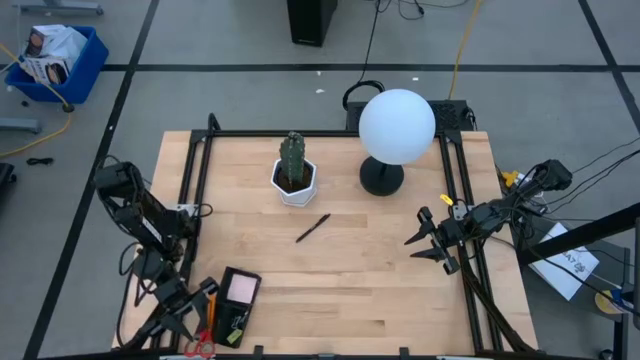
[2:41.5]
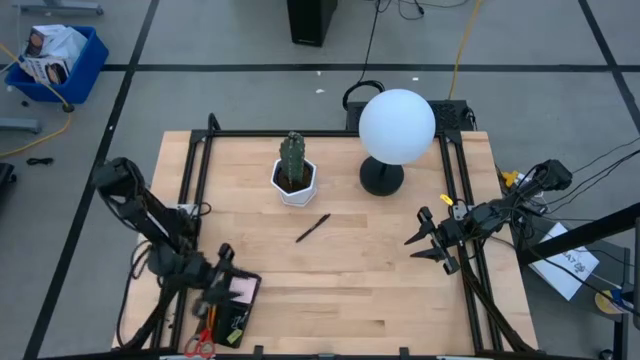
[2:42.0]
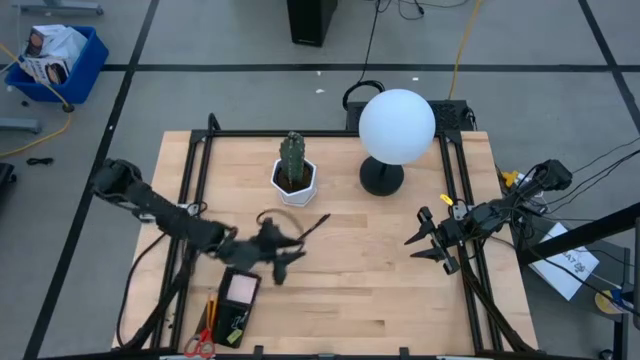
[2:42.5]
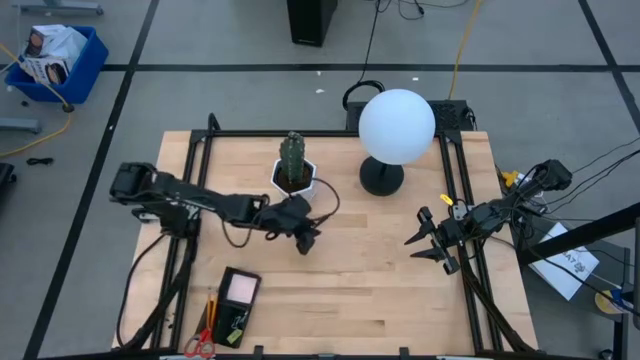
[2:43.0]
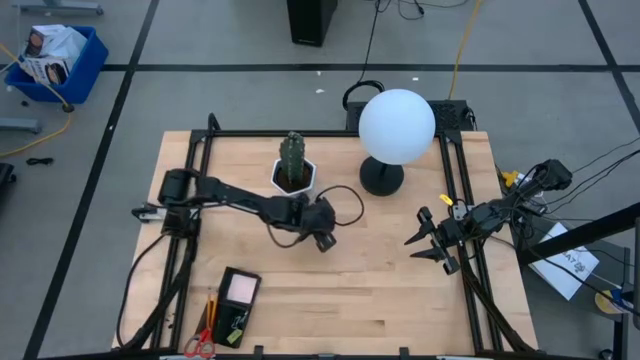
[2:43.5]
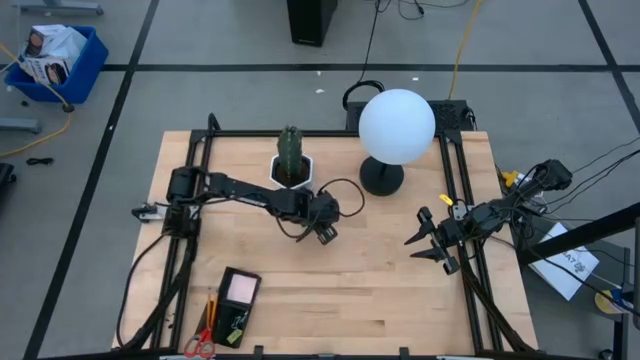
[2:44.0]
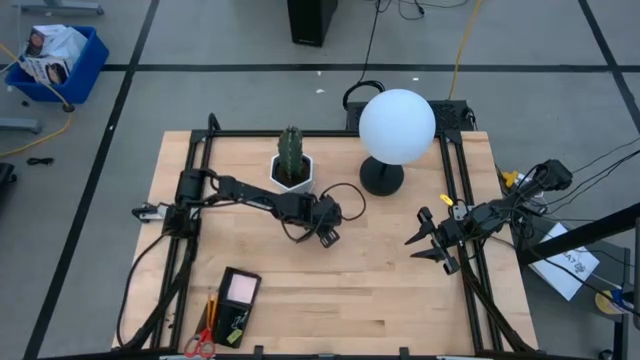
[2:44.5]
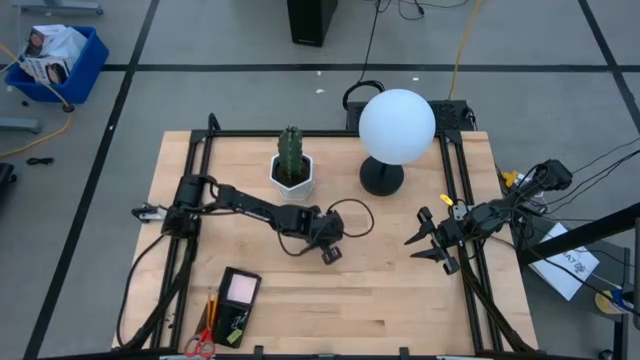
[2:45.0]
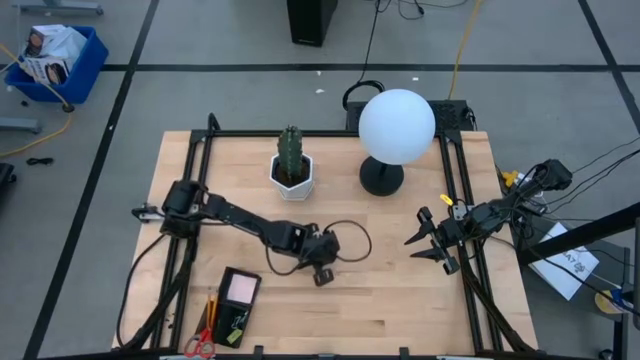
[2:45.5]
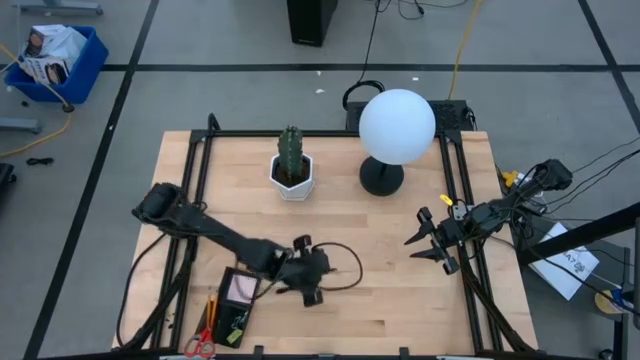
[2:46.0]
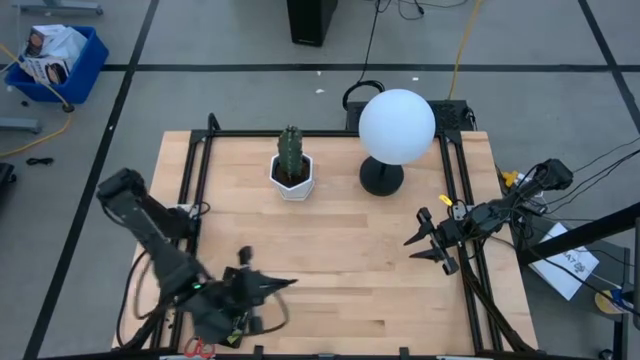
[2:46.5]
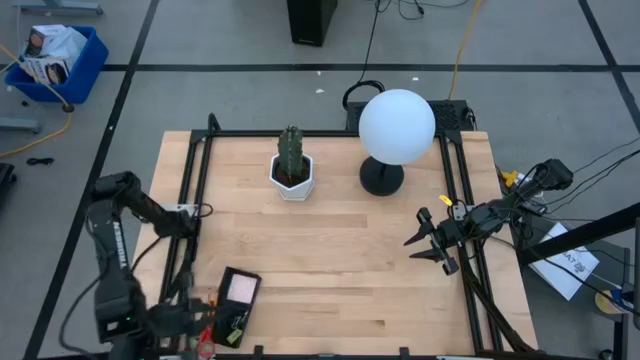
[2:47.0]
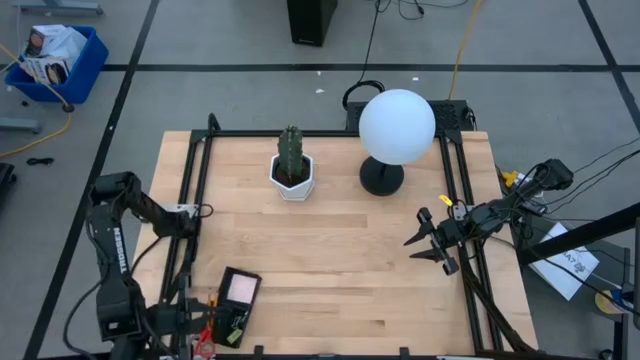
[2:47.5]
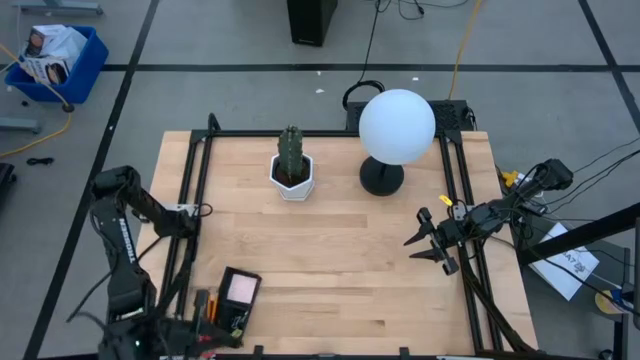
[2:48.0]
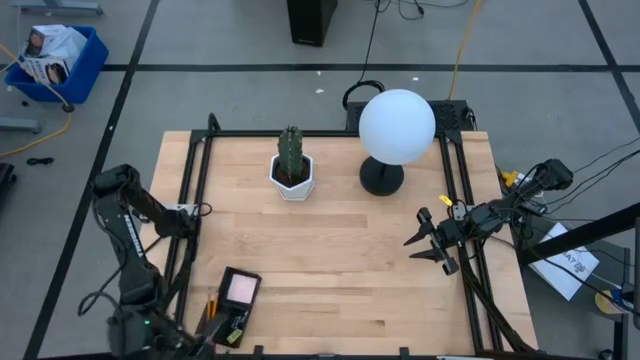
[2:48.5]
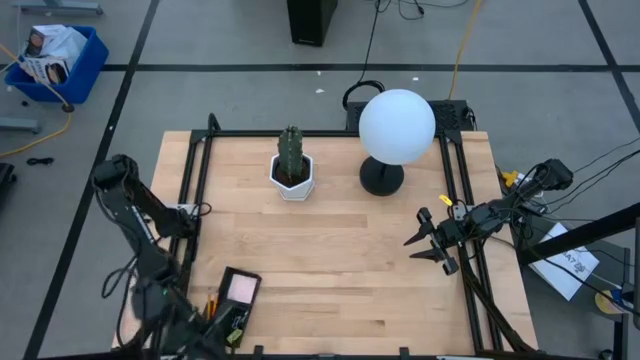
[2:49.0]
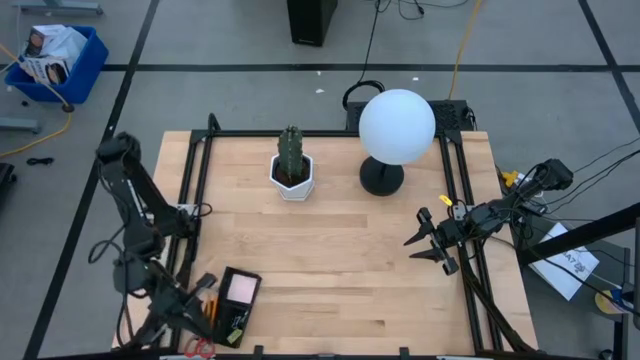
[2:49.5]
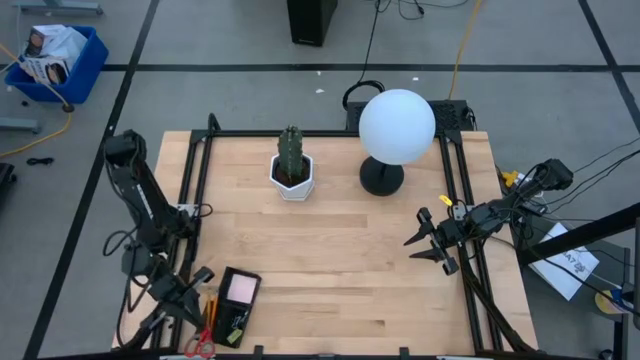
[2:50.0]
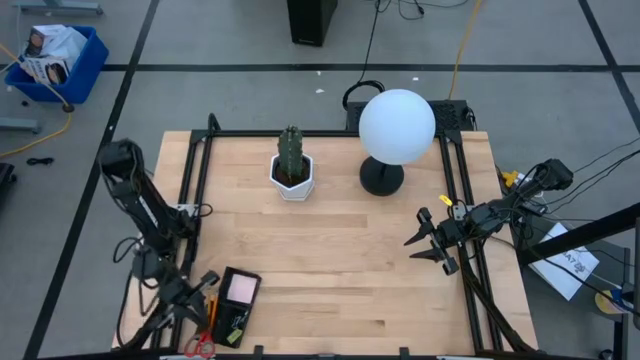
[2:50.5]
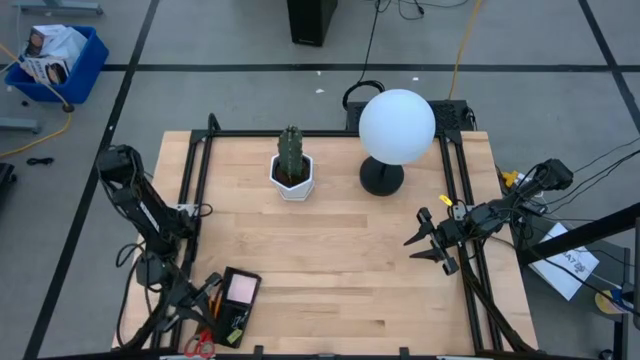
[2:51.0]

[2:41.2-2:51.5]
Task: Pick and place office supplies into organizer
Put the pen in the desk organizer

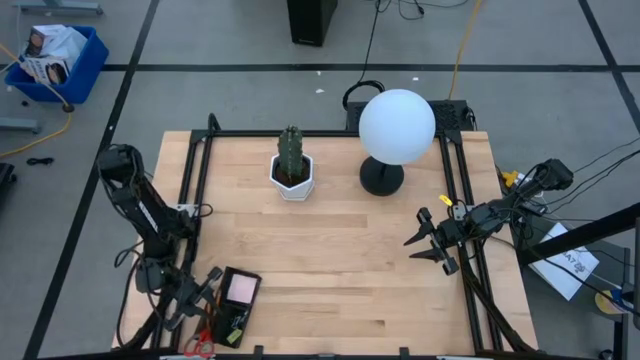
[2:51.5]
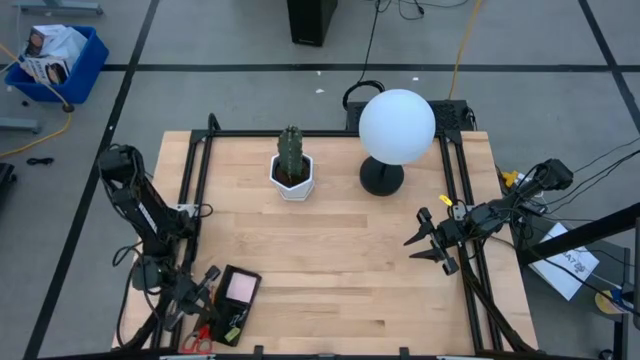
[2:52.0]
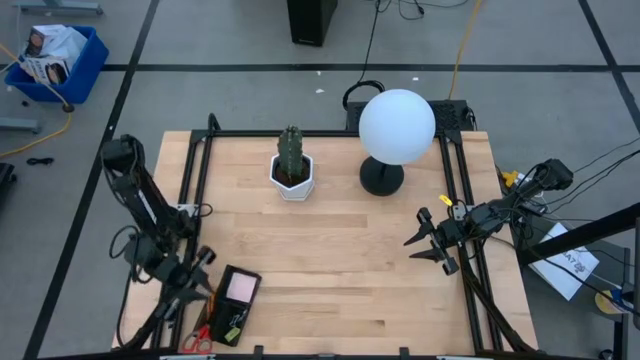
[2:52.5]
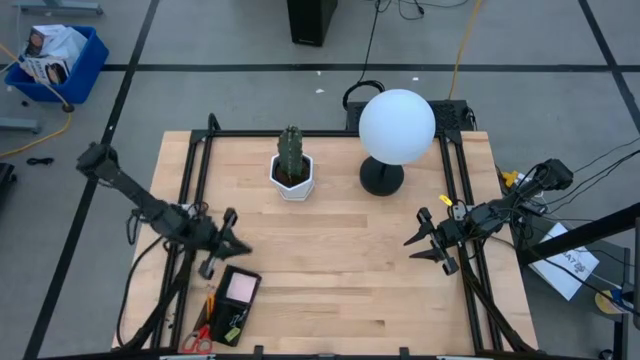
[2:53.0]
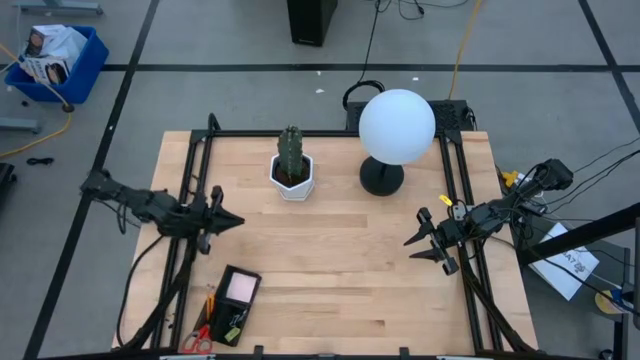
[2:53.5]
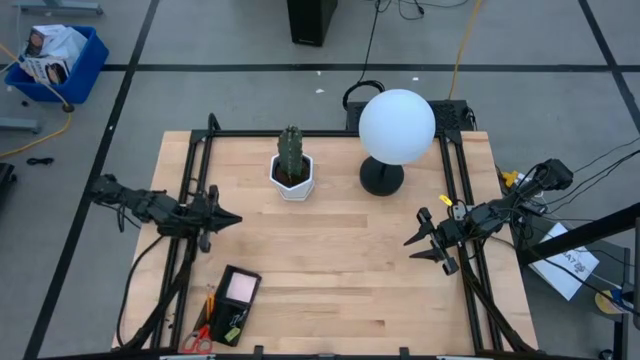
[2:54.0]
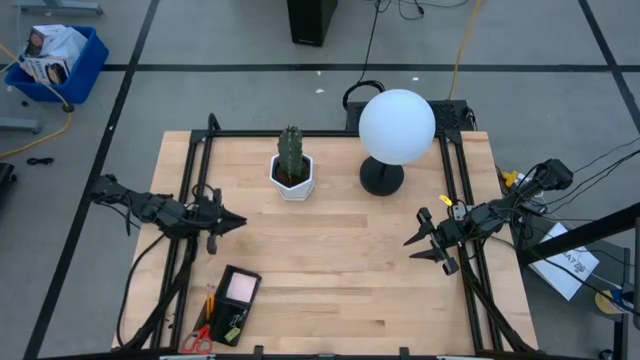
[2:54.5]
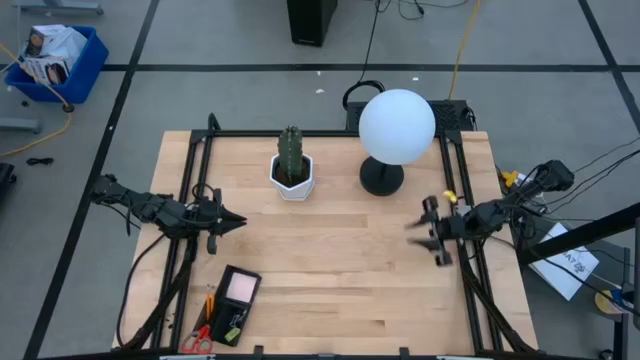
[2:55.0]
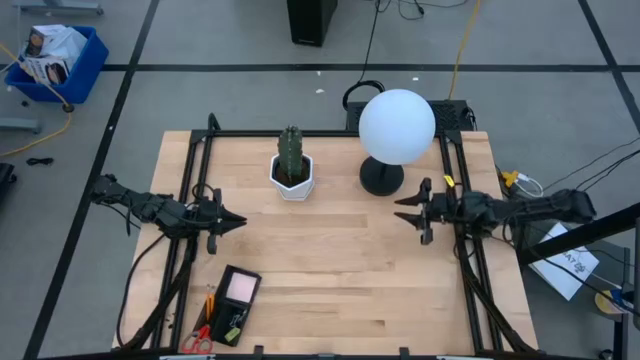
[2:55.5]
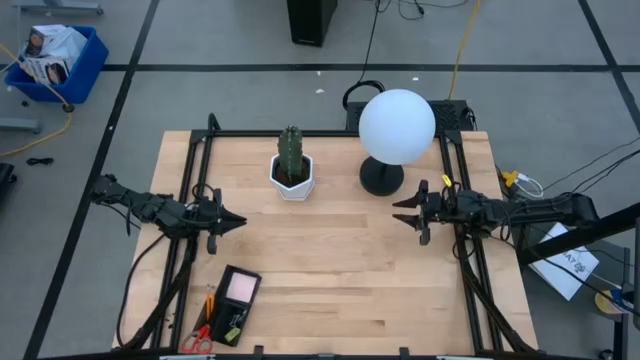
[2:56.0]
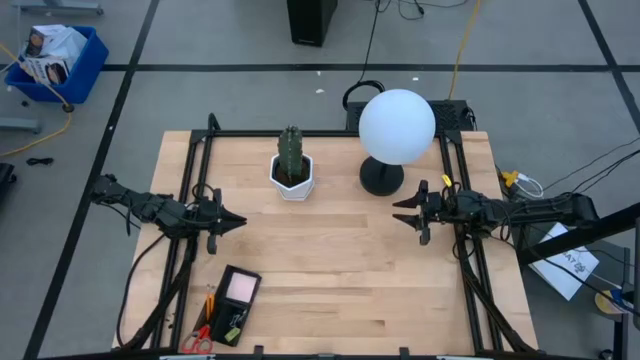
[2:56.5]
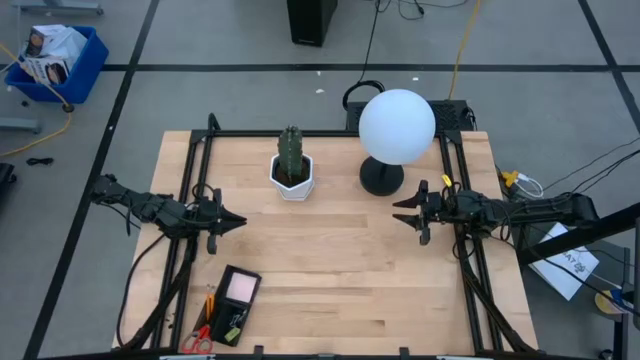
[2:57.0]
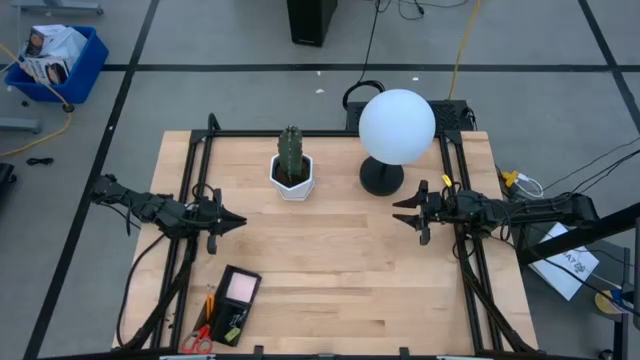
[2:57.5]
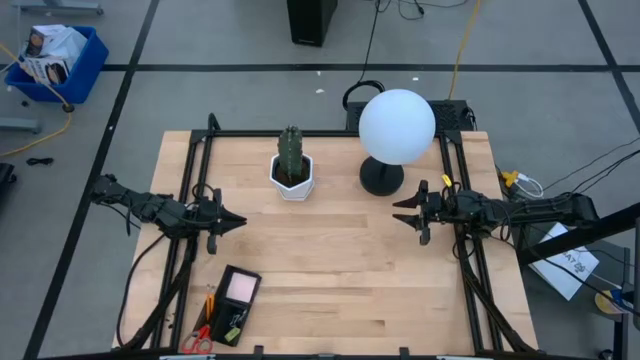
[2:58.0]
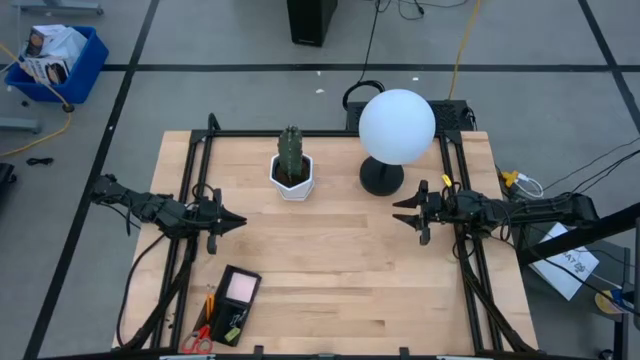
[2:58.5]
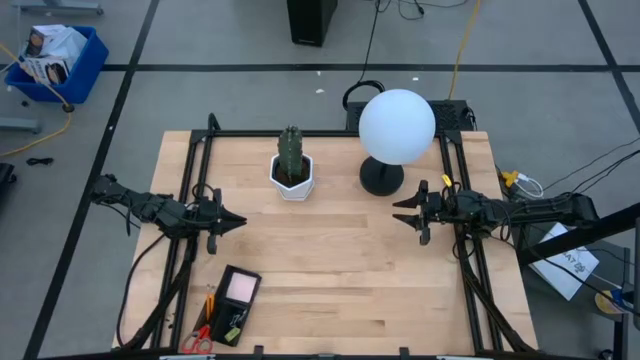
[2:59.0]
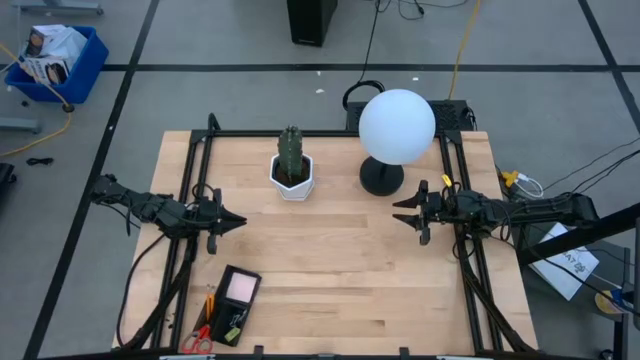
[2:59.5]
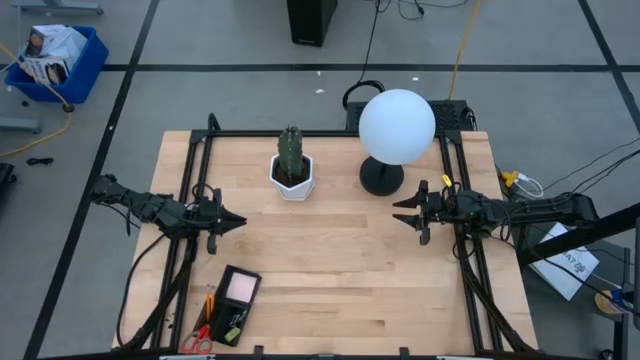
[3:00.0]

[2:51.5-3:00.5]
Return to Home Position

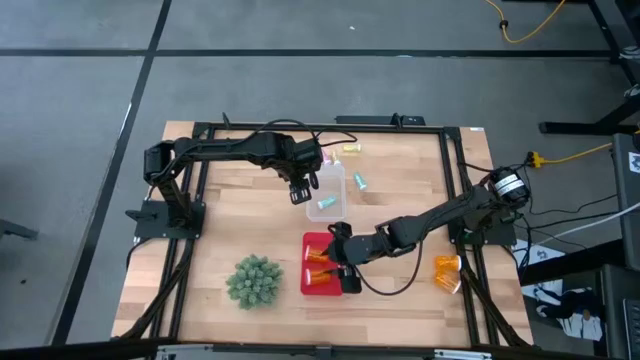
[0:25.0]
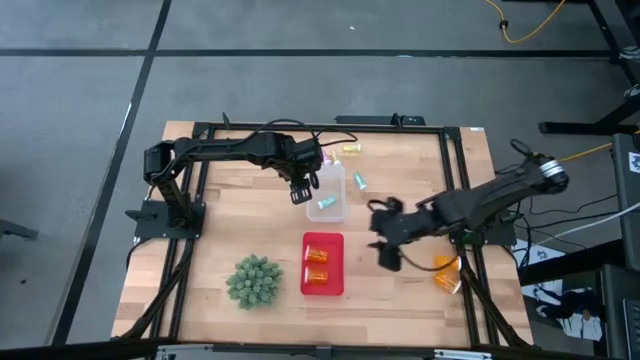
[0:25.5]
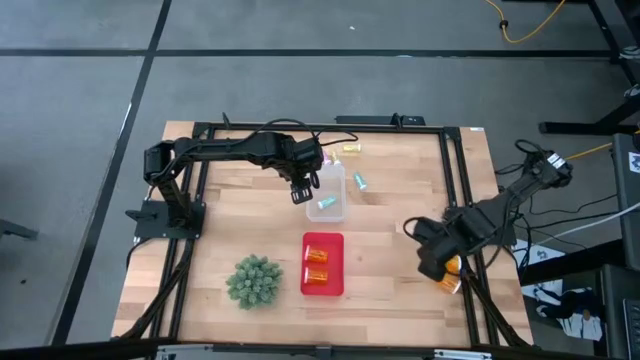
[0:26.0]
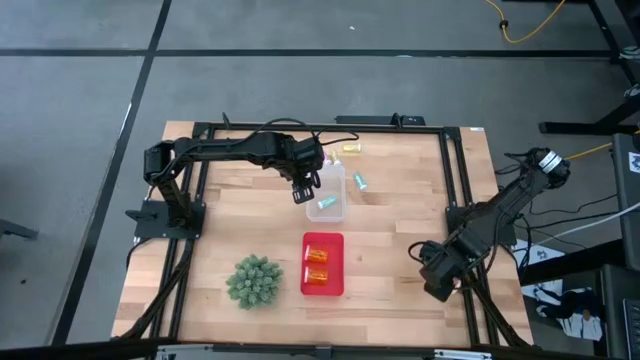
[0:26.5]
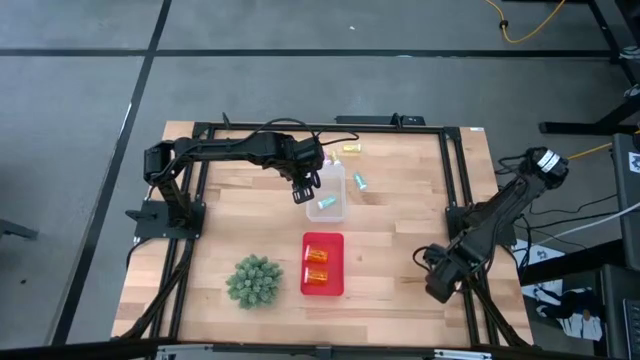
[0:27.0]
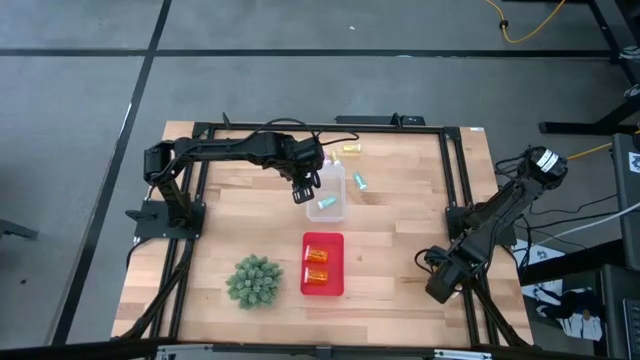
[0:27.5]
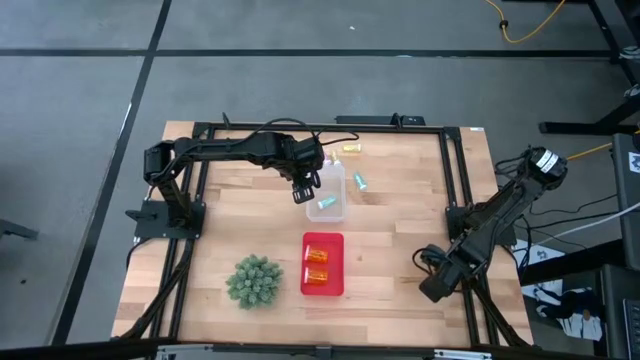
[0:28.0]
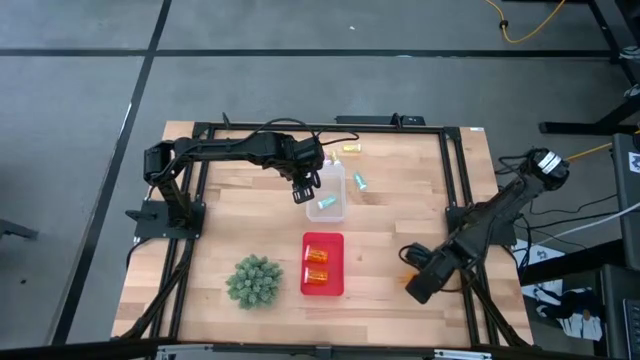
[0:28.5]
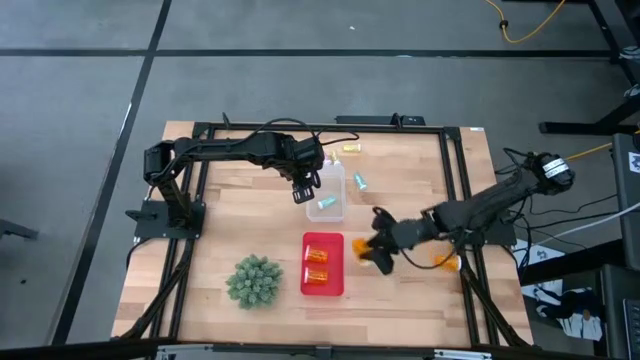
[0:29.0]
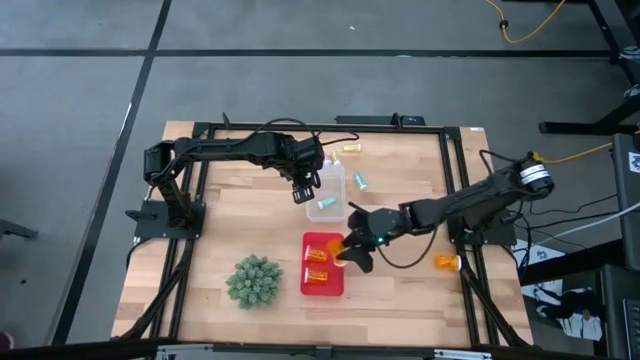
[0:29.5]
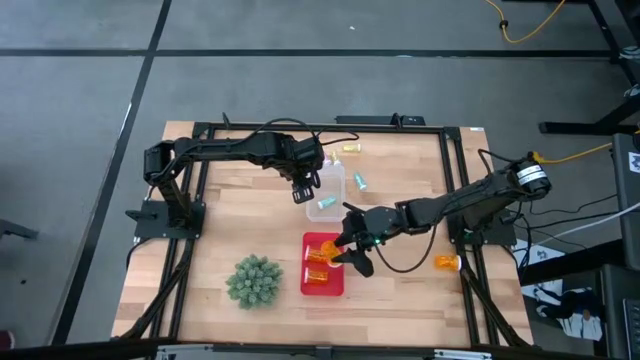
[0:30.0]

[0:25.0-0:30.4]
Task: Pick and place medicine bottles into bin by pill shape (circle, oval)
Put the bottom big orange pill bottle into the red bin
